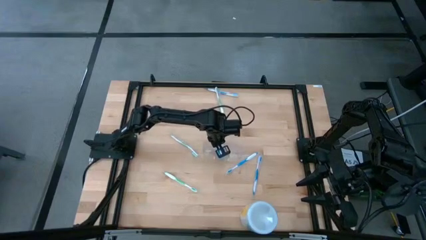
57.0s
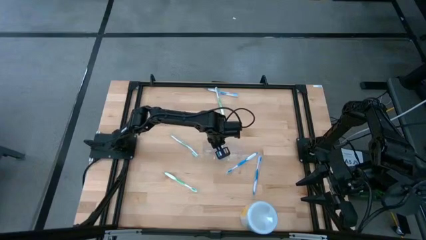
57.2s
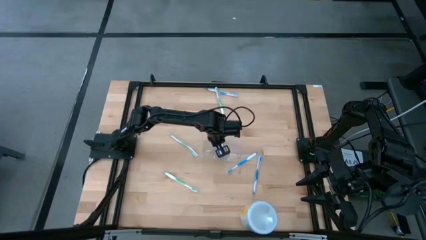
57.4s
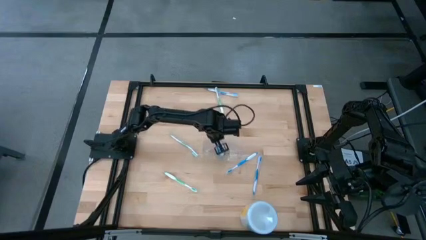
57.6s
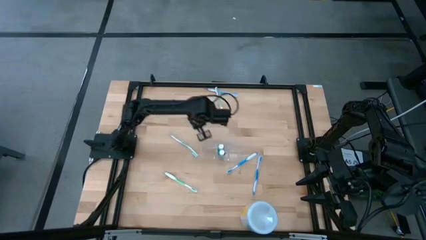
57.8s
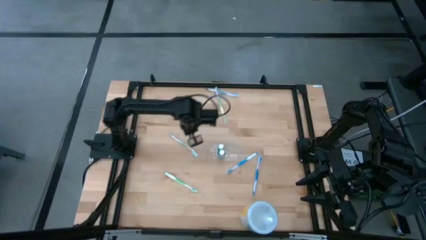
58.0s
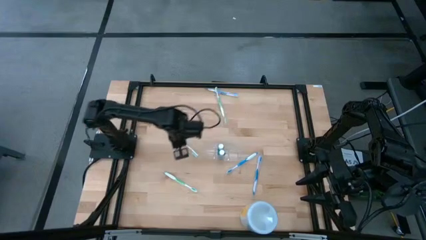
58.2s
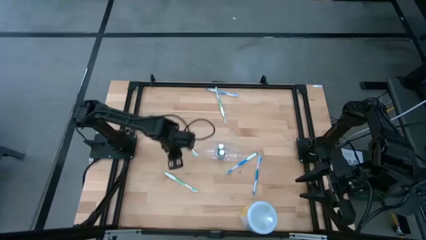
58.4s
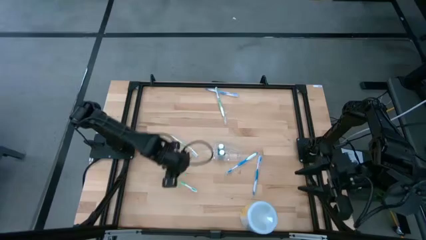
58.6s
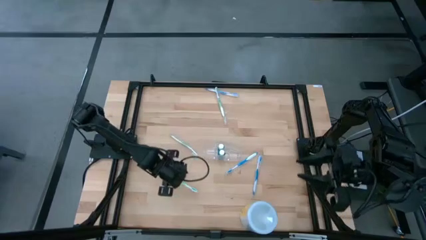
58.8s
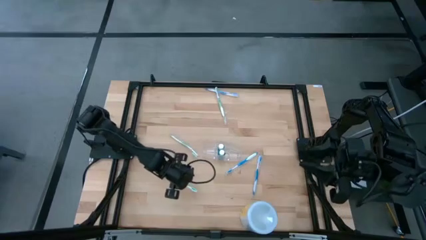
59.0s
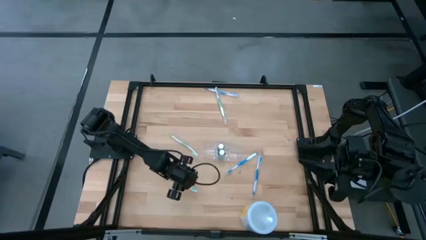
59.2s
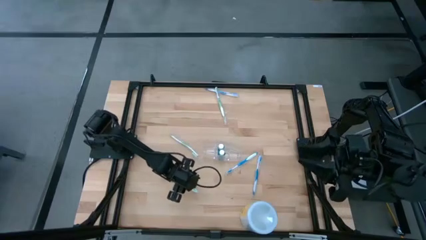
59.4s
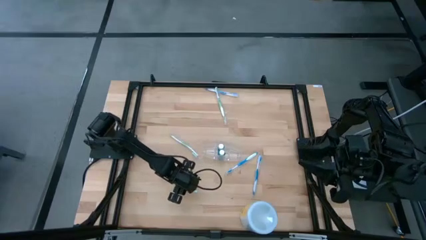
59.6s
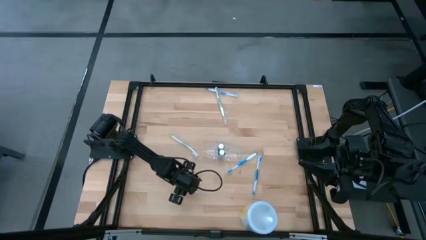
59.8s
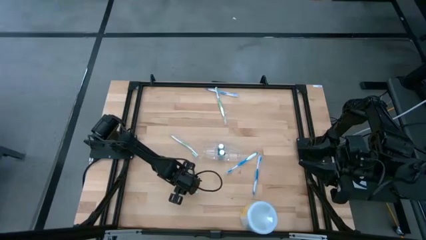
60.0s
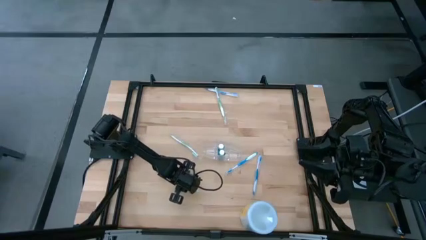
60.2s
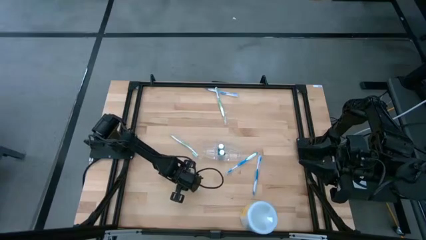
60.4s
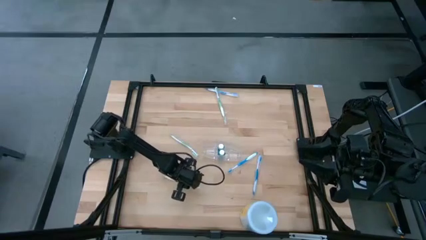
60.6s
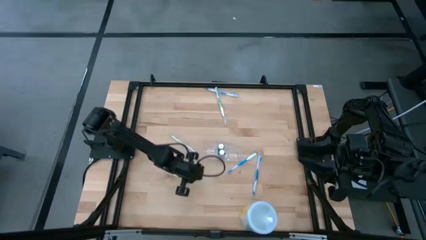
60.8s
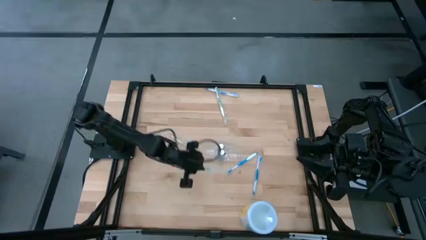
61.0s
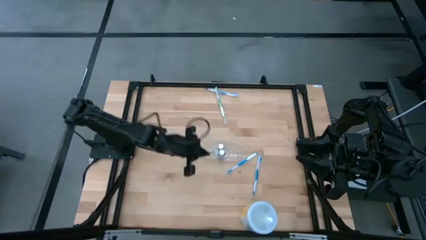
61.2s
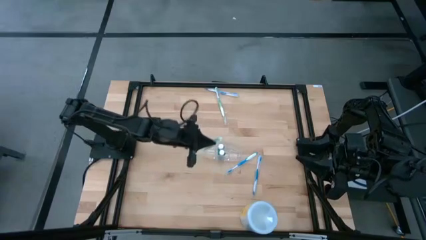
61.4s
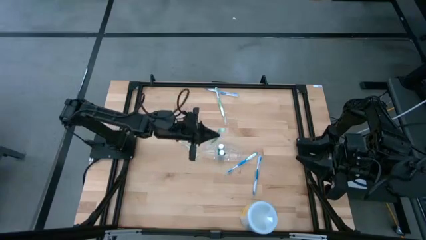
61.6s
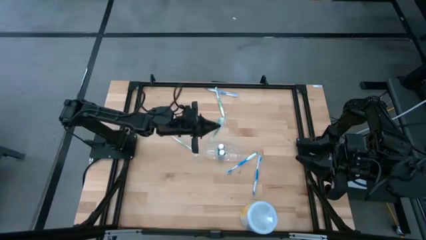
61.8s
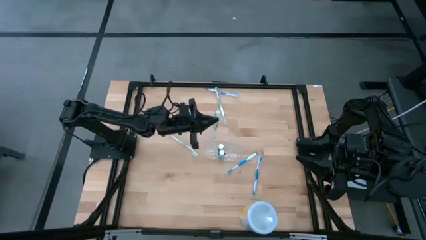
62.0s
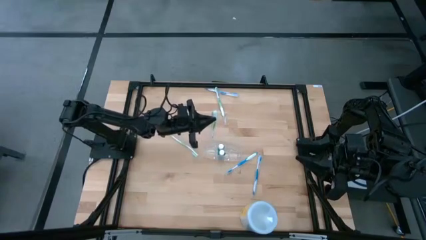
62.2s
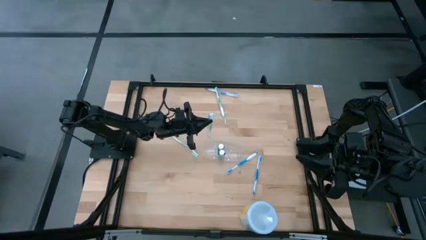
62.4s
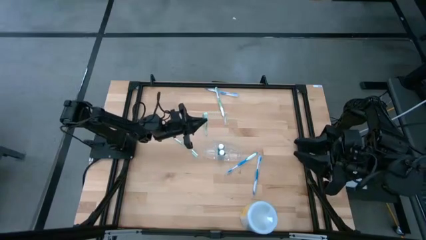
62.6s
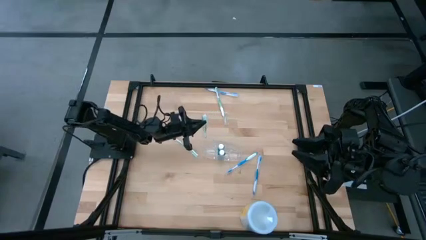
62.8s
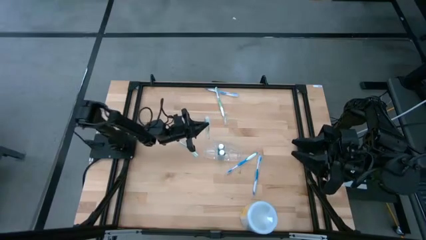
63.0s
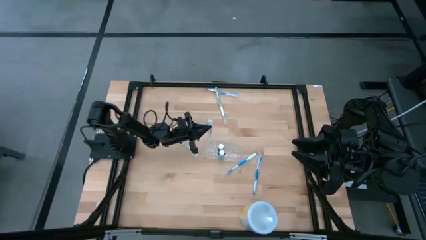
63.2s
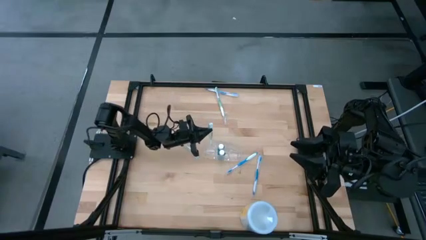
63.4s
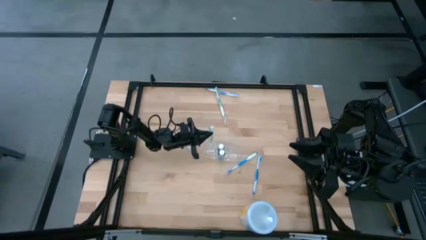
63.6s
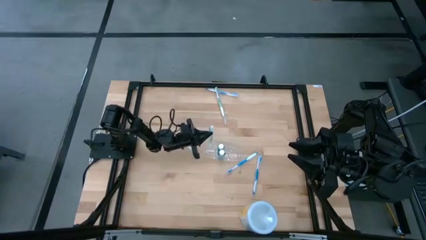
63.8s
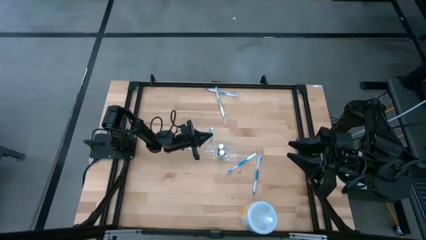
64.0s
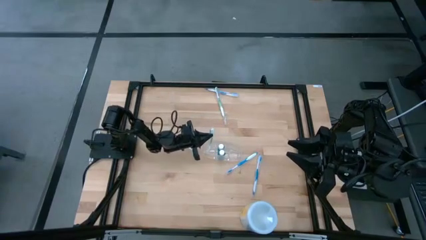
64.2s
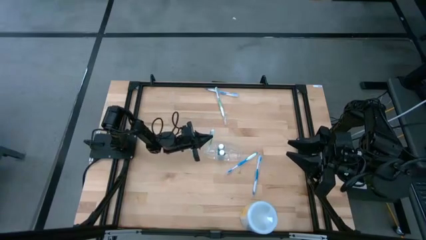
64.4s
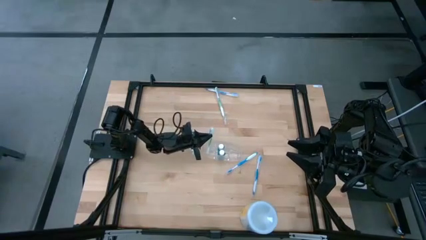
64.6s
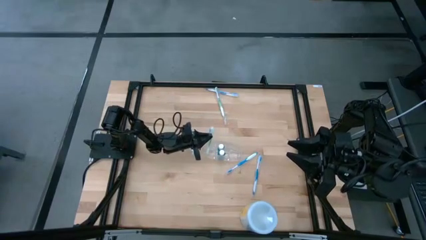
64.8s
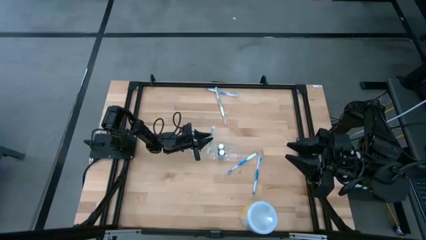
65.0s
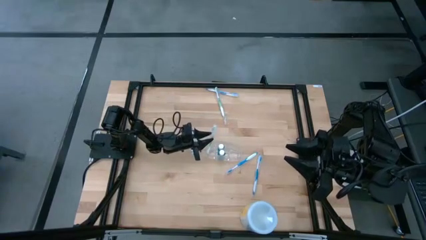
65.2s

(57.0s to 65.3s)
Task: Pick & Place toothbrushing station
Put the bottom green toothbrush into the transparent organizer

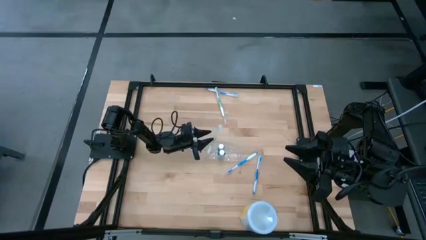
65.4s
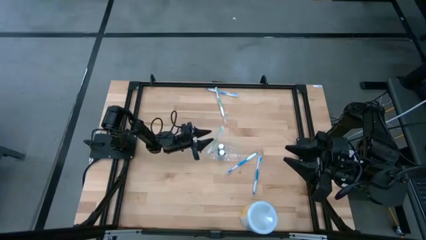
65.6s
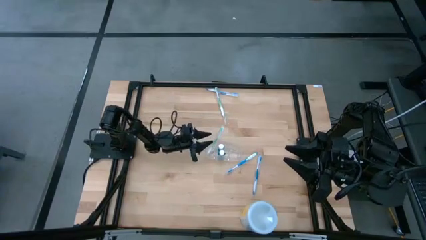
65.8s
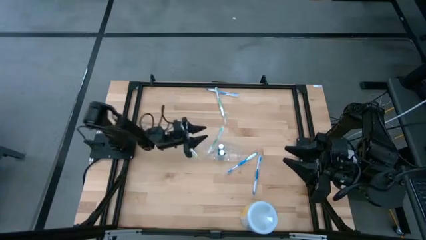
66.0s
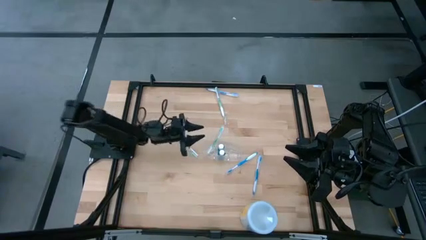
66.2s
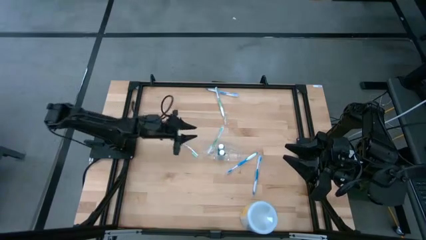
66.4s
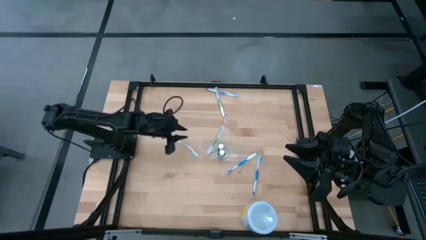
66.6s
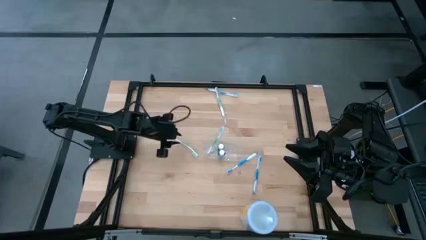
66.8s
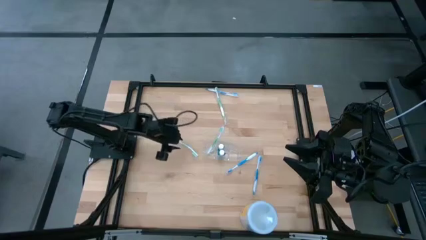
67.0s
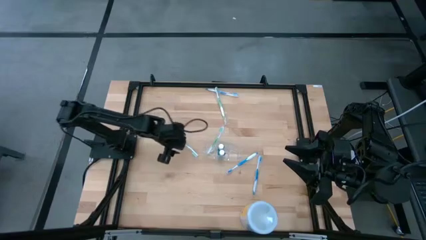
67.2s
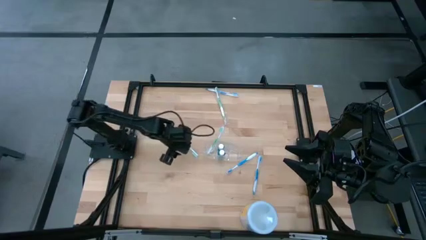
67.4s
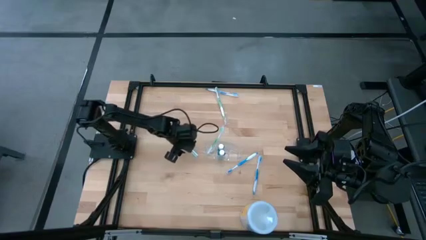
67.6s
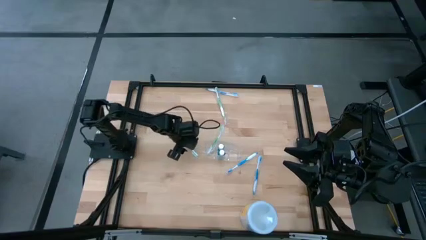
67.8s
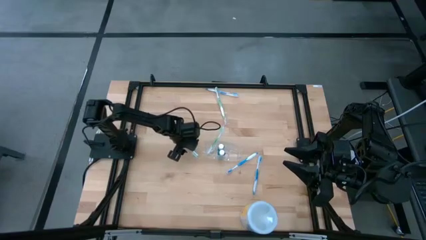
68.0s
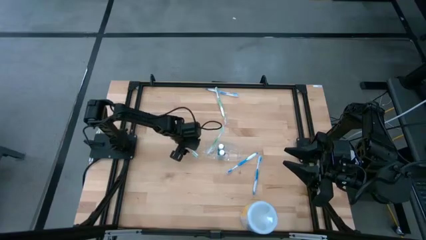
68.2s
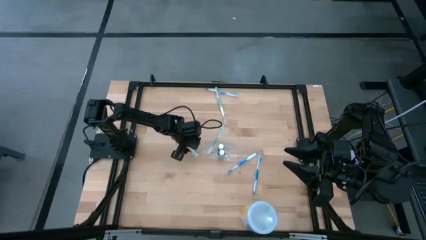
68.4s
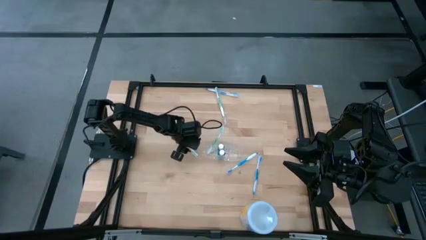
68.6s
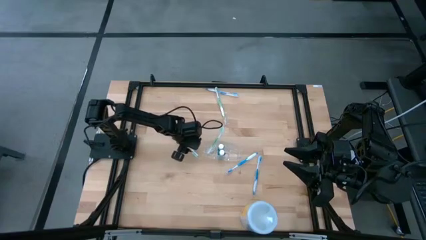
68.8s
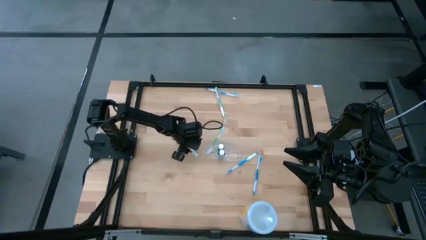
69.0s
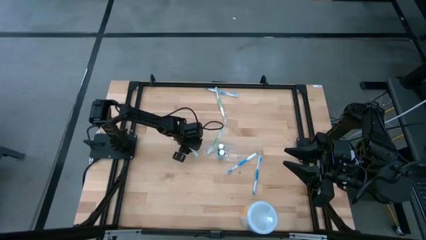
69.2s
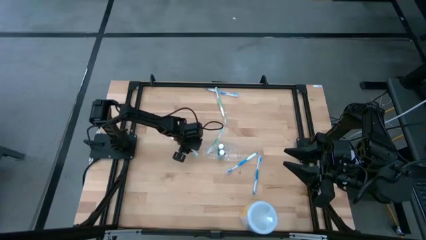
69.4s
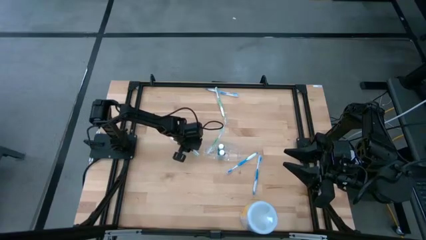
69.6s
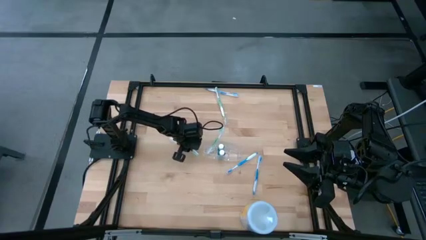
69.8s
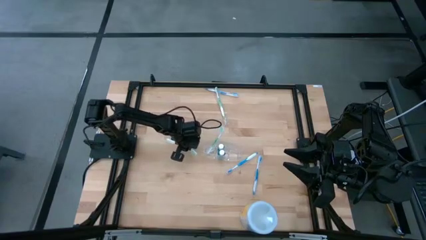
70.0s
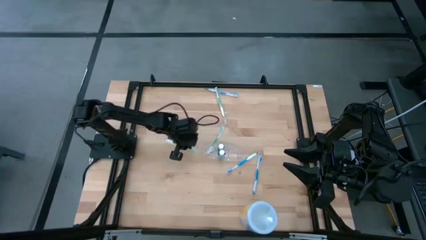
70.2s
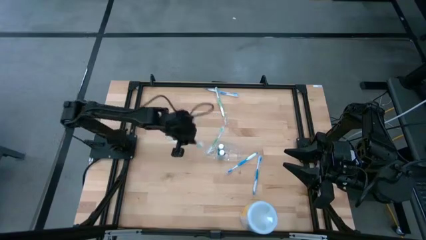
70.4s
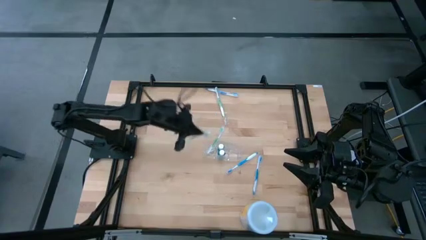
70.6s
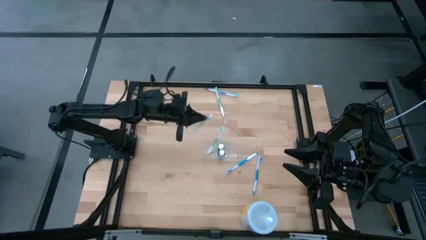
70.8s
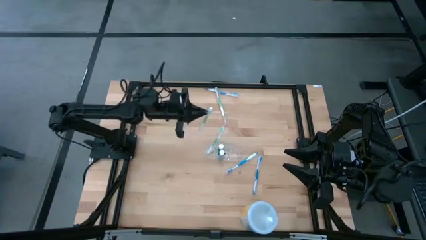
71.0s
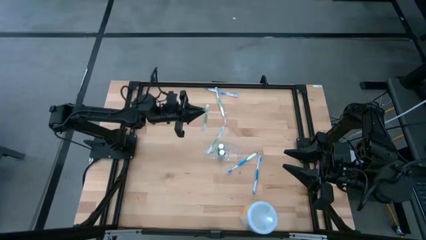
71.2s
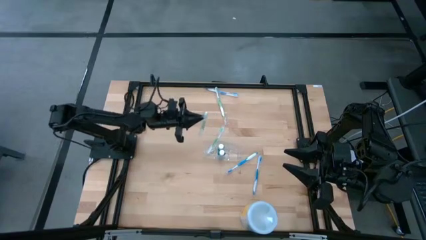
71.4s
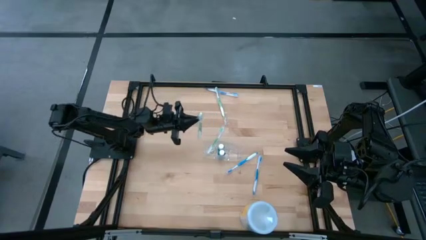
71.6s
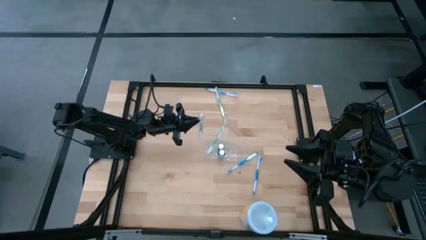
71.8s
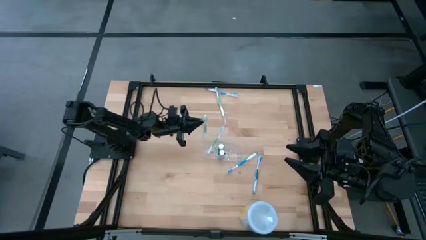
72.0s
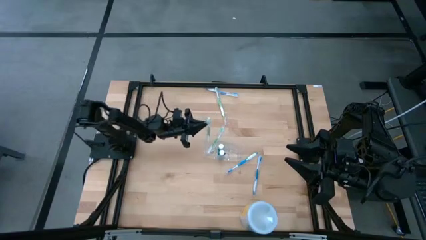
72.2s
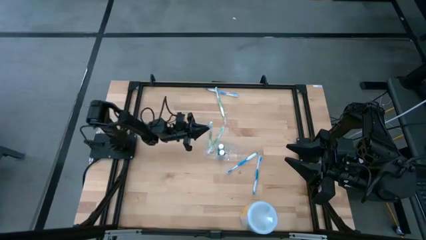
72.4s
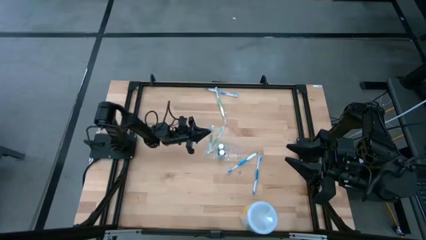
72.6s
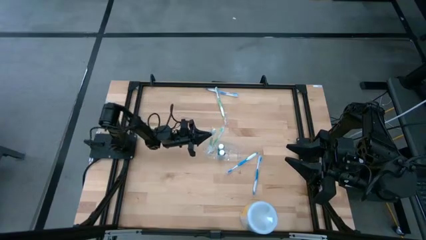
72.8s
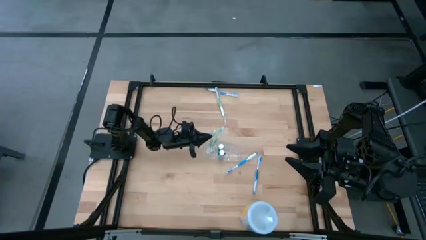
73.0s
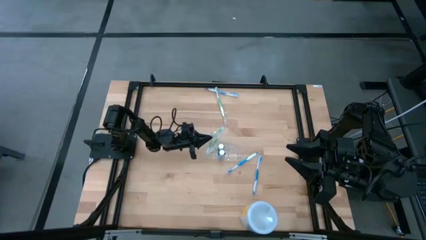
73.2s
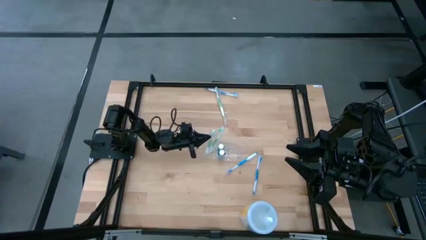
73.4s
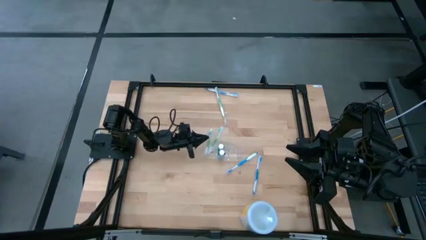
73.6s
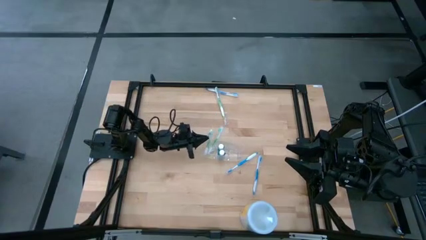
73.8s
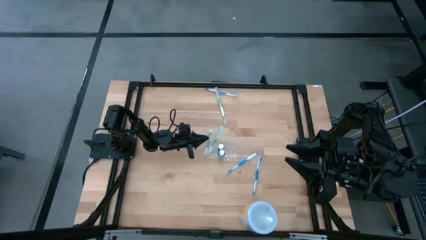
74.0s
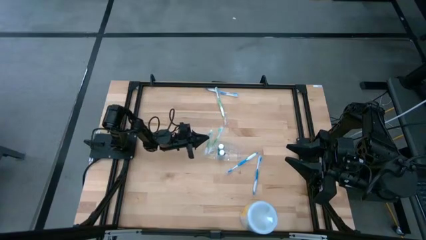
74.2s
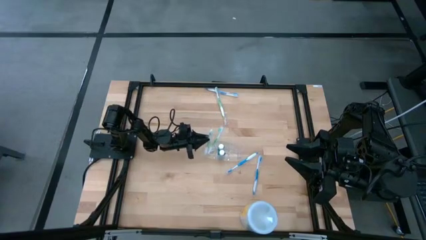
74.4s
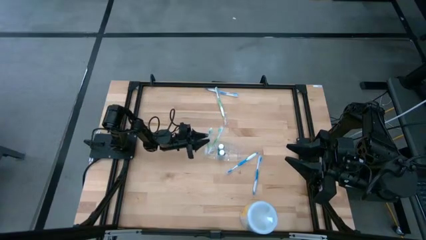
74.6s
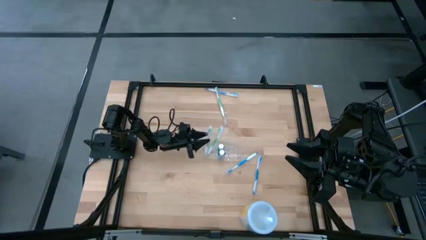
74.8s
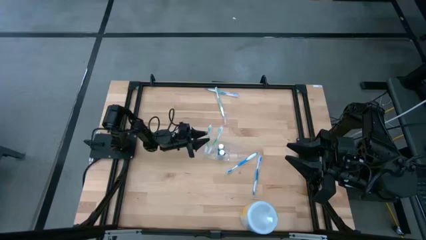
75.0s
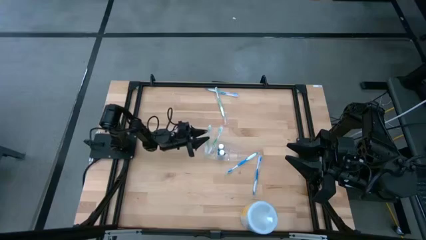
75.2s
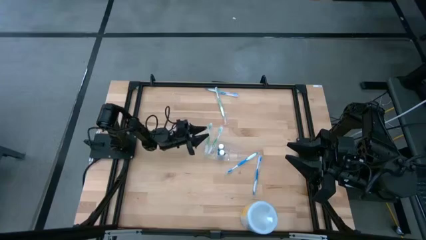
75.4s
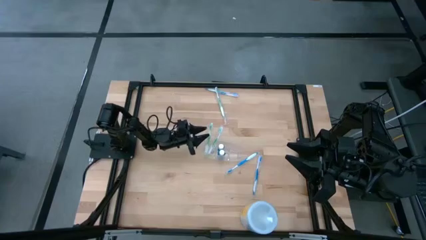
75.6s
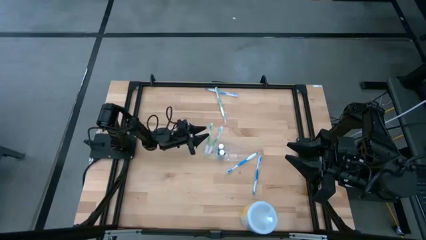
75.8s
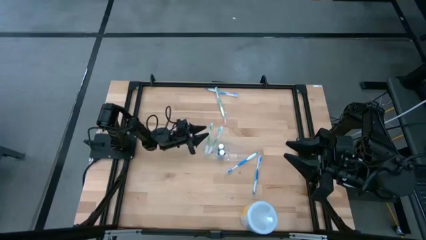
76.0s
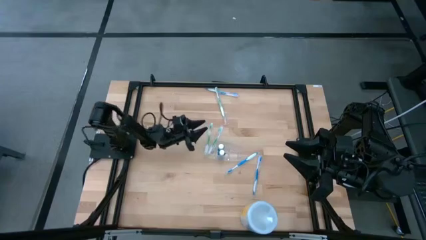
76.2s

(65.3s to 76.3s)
Put the bottom green toothbrush into the transparent organizer
